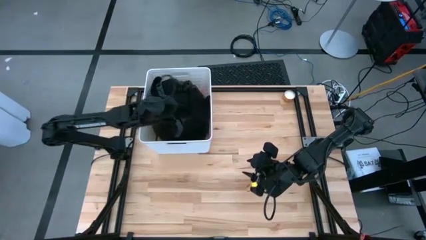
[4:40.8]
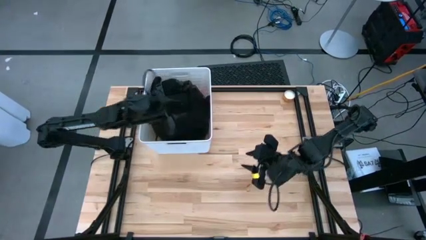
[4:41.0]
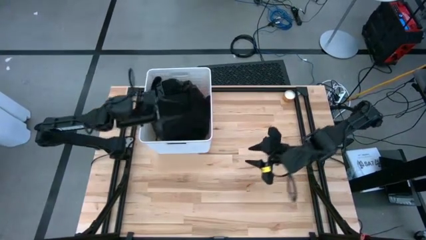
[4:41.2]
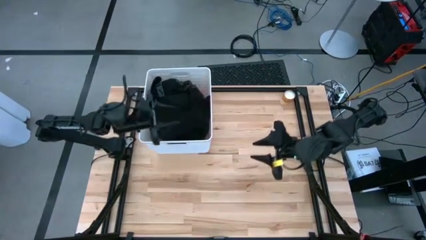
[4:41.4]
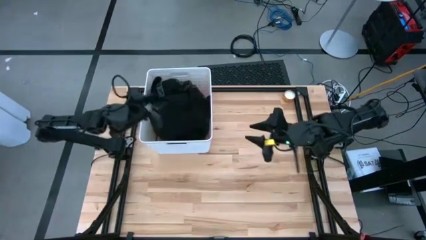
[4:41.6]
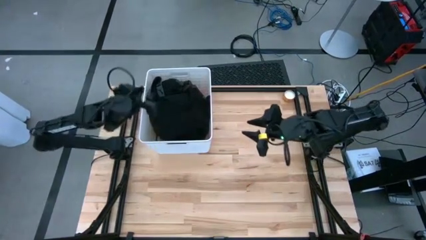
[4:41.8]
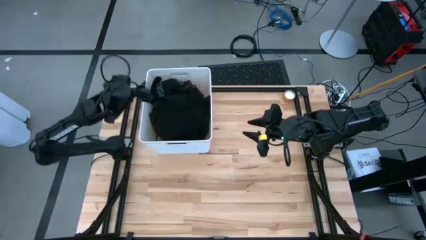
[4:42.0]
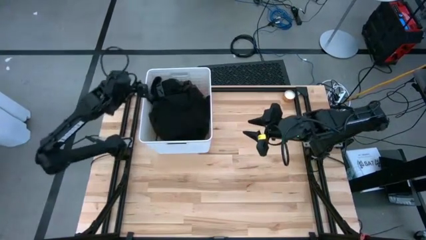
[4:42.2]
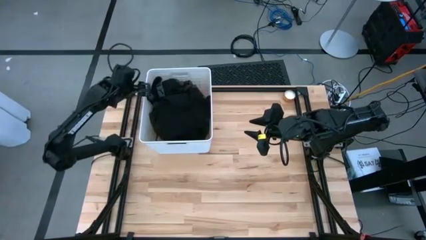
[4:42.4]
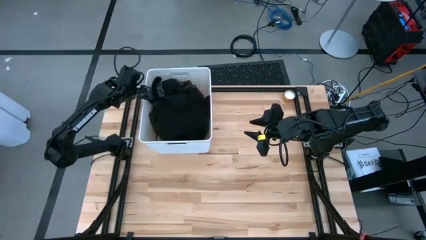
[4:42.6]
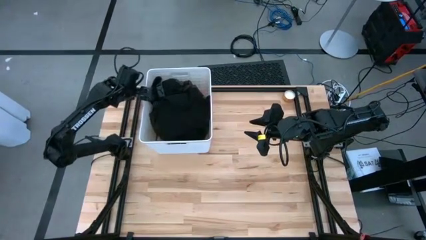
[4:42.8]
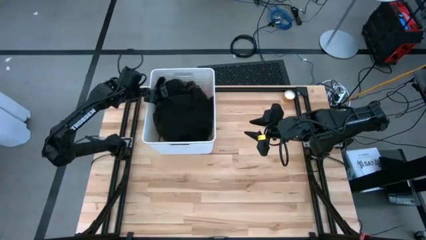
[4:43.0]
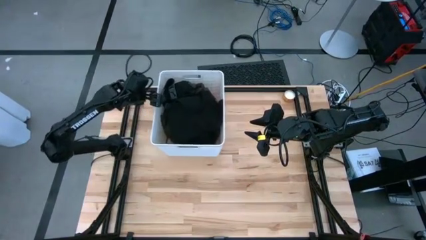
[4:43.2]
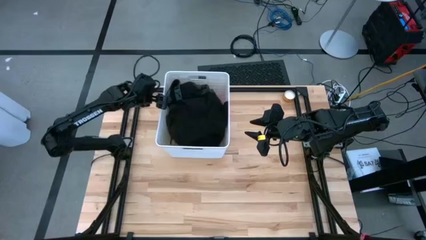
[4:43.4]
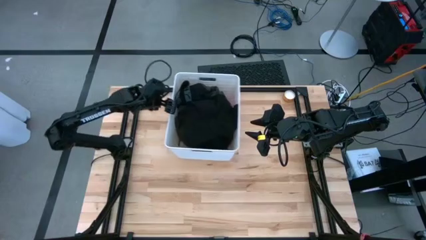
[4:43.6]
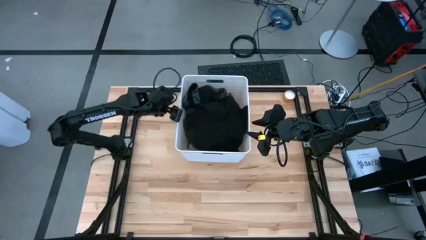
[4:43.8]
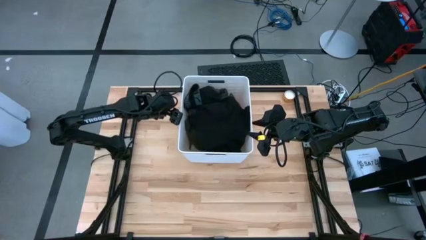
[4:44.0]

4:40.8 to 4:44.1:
Task: Sort clothes
Move the white laundry bin to the top center of the table

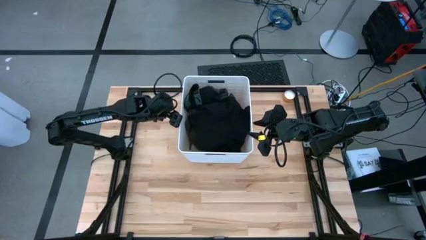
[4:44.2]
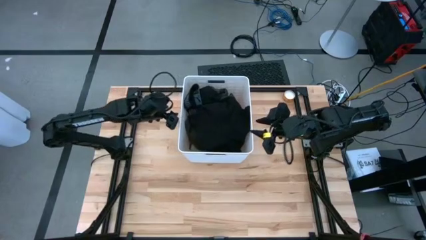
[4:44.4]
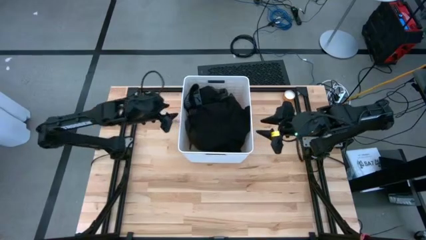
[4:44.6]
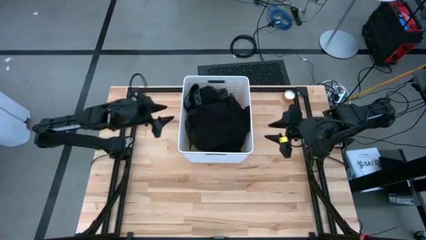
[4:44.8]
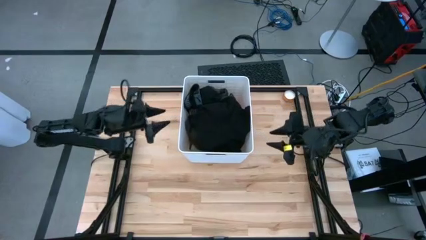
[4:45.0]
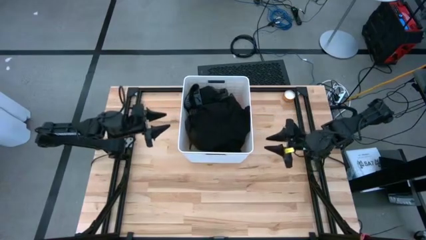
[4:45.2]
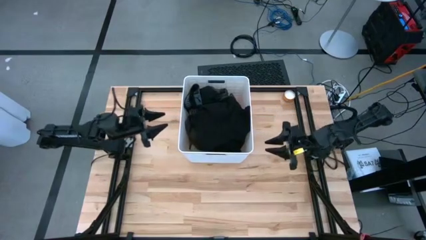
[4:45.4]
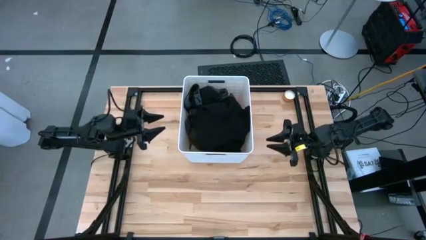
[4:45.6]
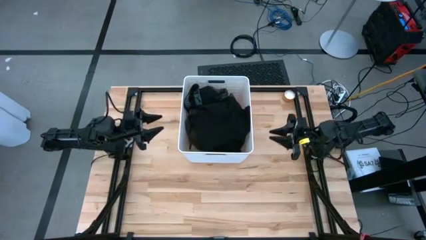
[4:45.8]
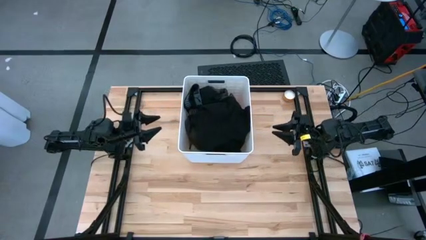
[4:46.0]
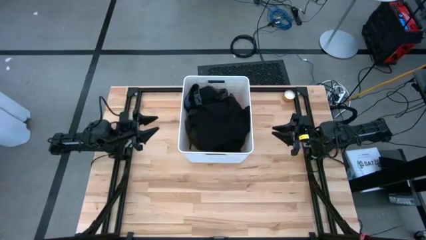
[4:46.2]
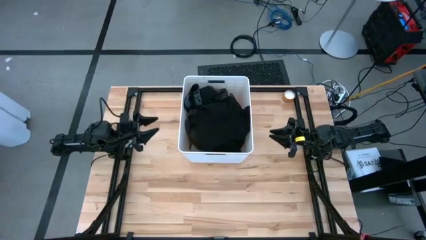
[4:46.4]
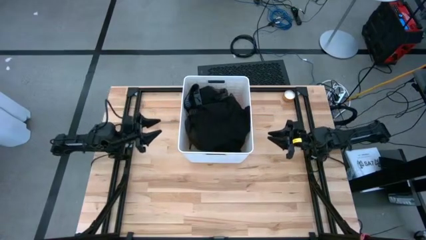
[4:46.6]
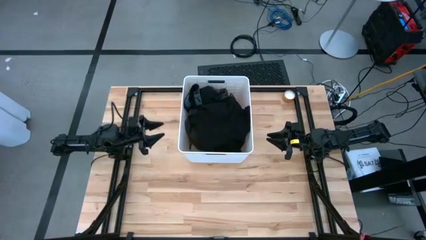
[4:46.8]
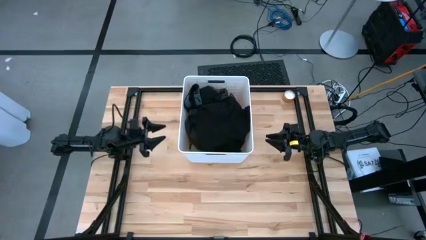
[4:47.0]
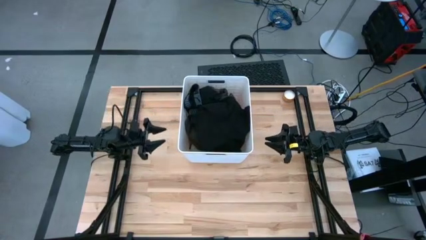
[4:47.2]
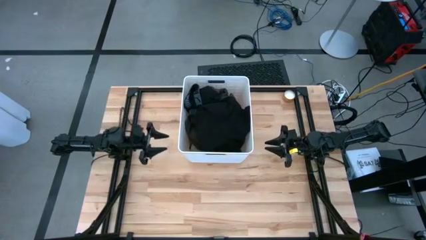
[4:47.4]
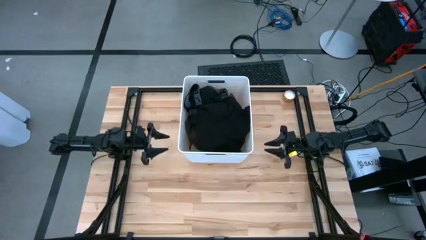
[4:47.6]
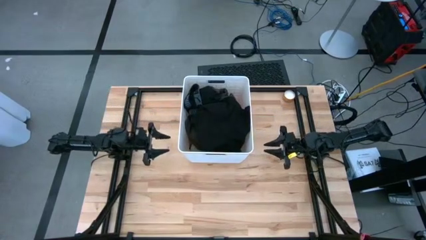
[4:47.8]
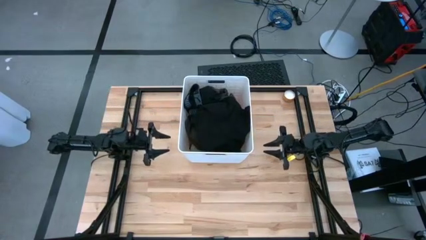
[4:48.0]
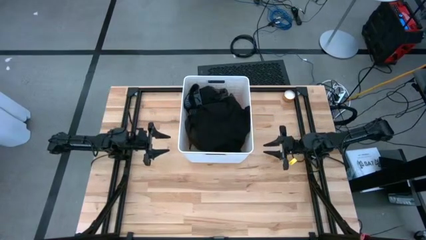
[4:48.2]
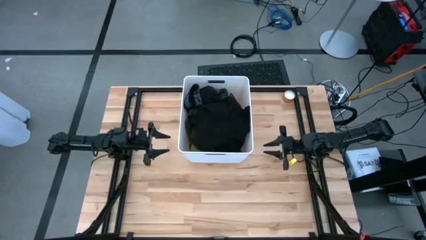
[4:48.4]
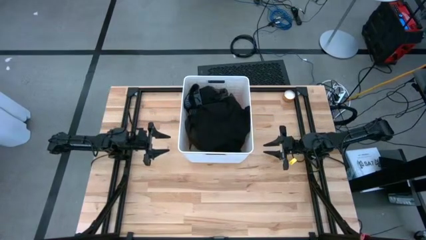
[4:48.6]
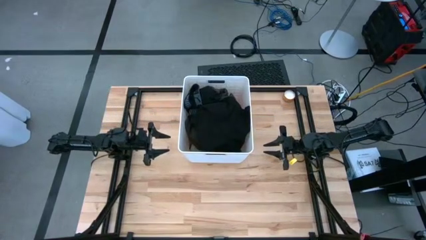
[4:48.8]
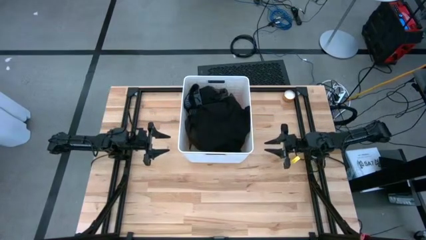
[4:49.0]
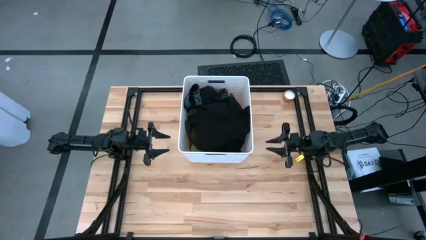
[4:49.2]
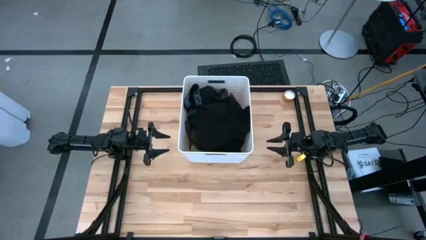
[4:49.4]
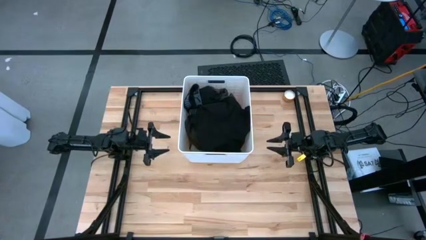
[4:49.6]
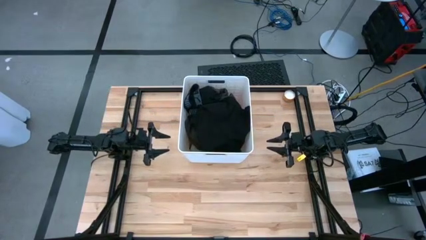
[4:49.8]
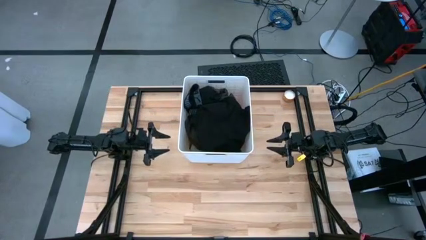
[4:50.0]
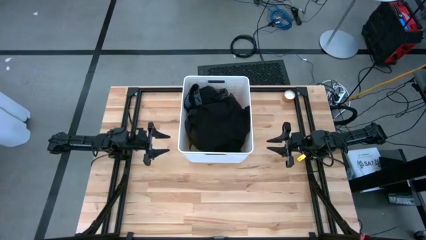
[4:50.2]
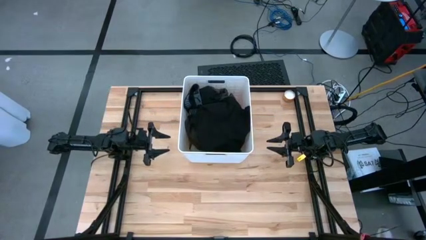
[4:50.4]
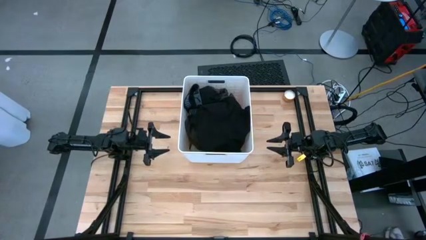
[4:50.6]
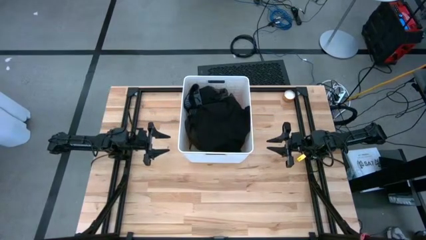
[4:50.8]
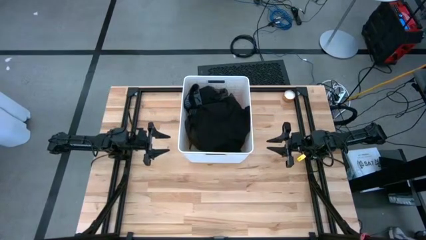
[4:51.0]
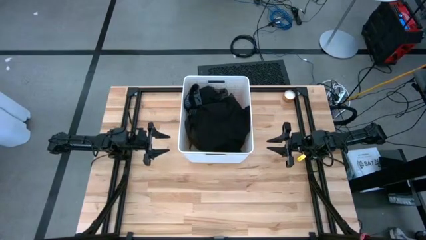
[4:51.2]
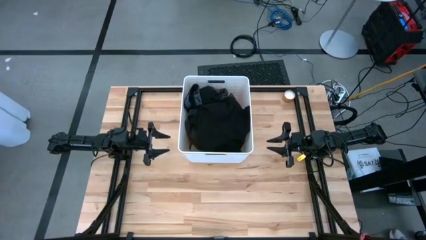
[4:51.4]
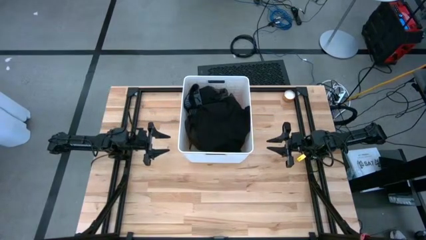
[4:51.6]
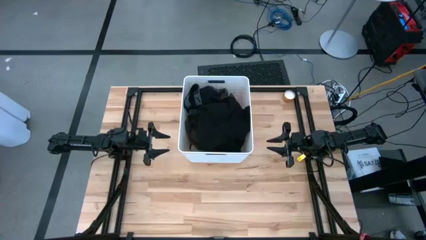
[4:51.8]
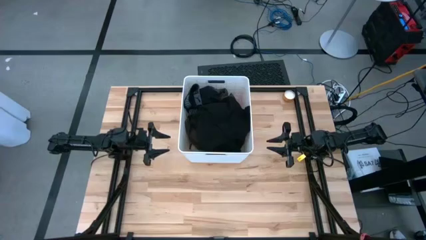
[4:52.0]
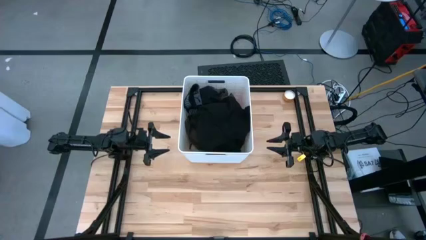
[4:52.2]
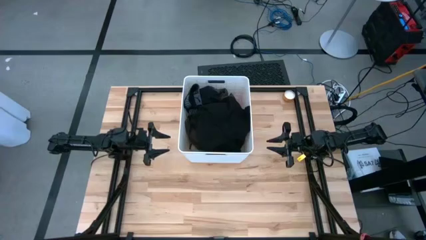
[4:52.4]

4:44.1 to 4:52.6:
Return to Home Position

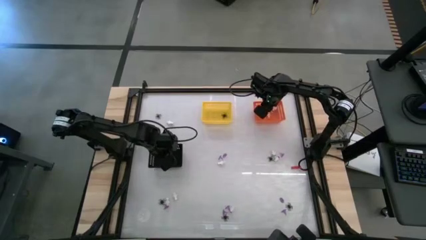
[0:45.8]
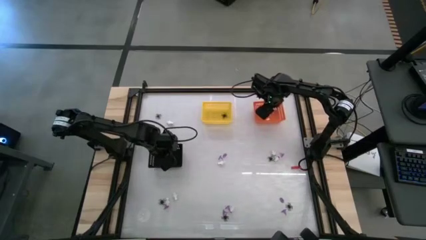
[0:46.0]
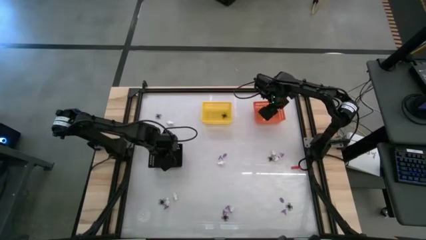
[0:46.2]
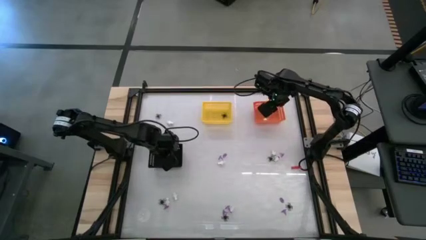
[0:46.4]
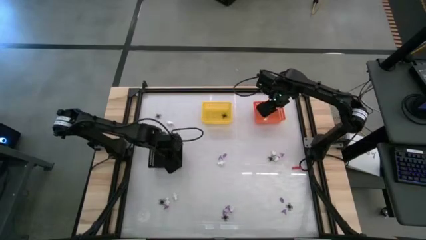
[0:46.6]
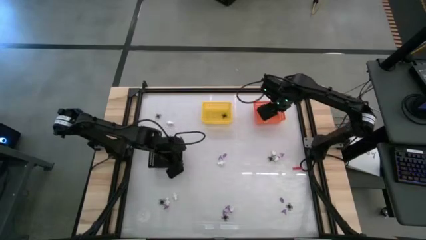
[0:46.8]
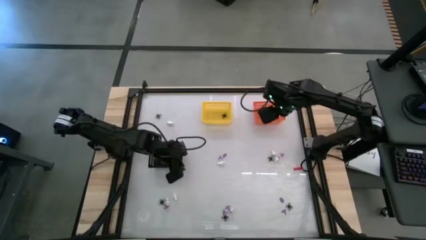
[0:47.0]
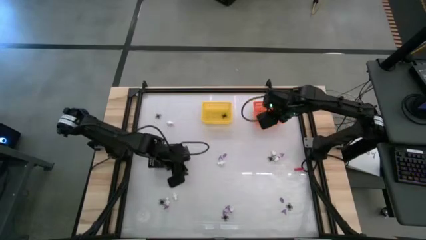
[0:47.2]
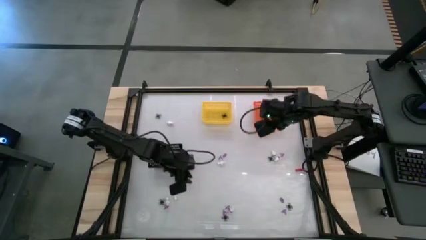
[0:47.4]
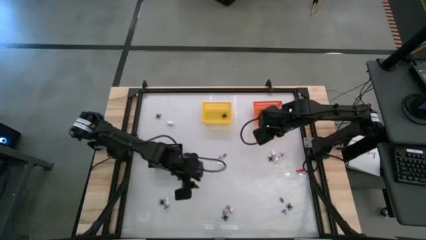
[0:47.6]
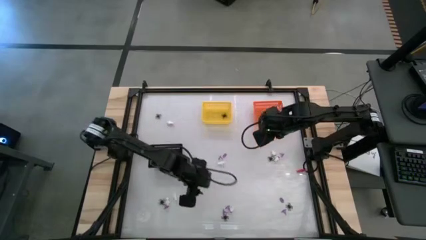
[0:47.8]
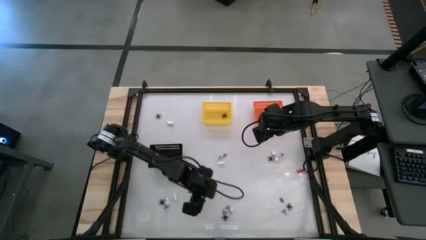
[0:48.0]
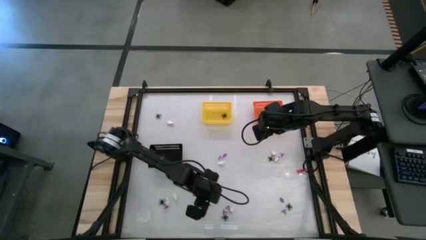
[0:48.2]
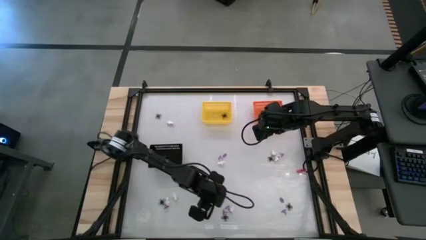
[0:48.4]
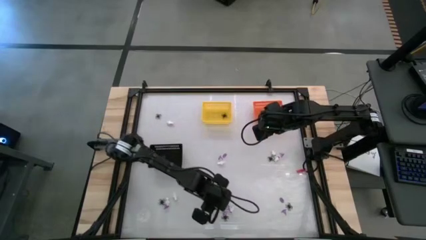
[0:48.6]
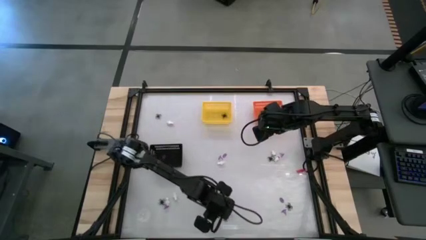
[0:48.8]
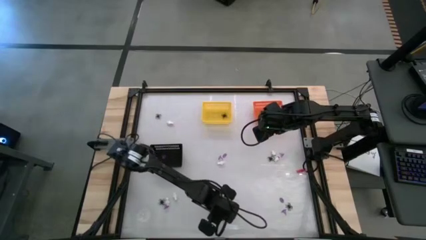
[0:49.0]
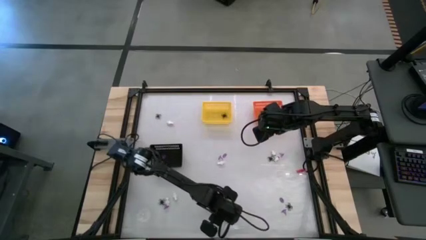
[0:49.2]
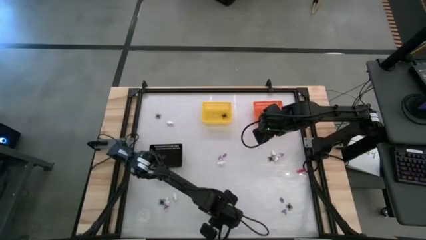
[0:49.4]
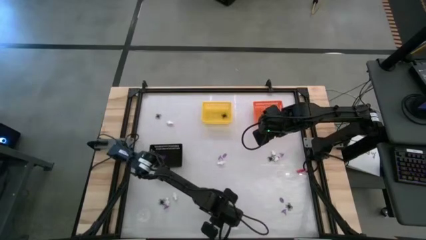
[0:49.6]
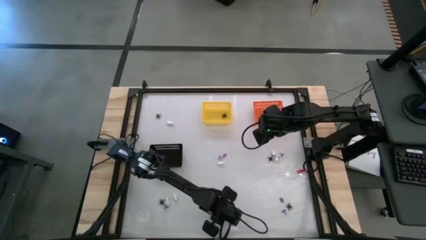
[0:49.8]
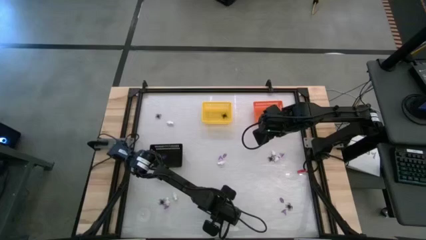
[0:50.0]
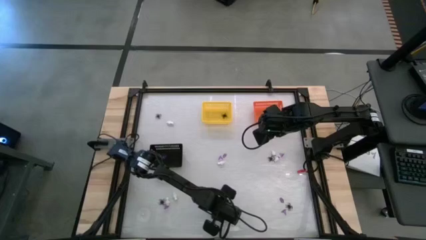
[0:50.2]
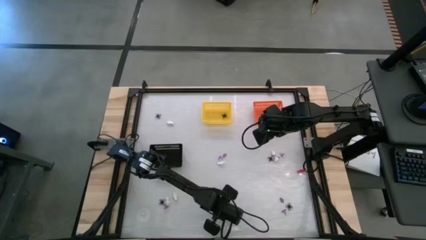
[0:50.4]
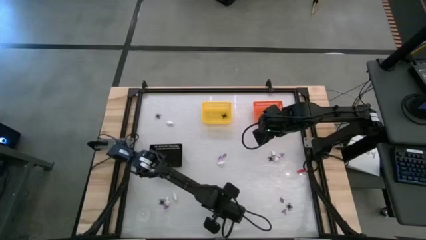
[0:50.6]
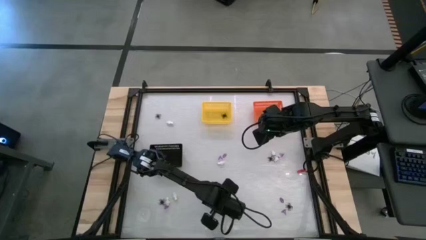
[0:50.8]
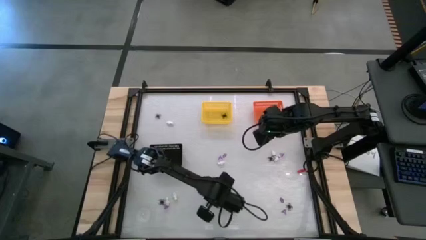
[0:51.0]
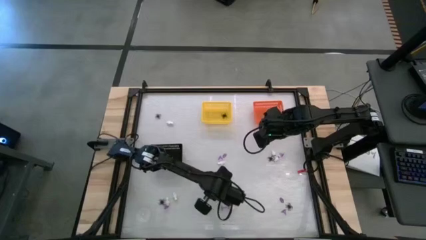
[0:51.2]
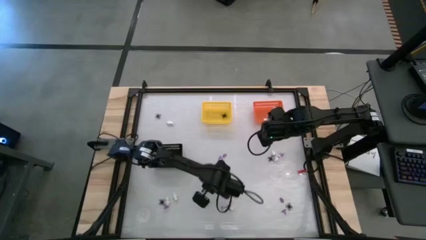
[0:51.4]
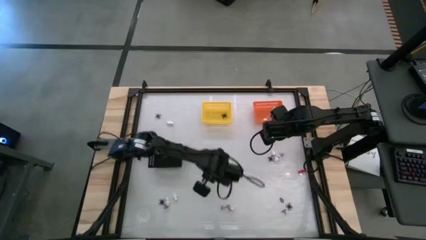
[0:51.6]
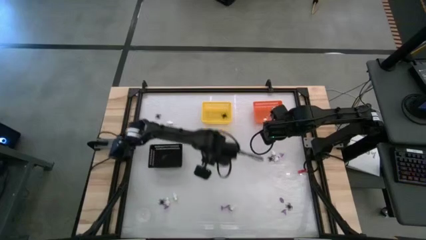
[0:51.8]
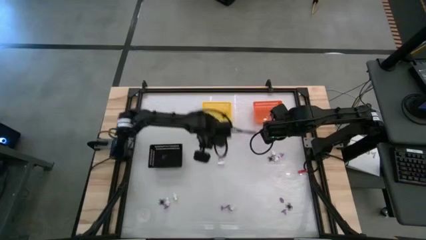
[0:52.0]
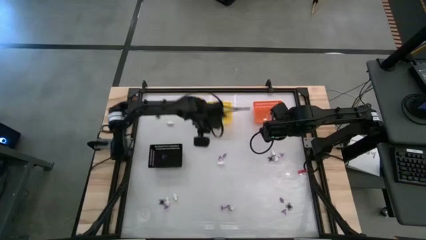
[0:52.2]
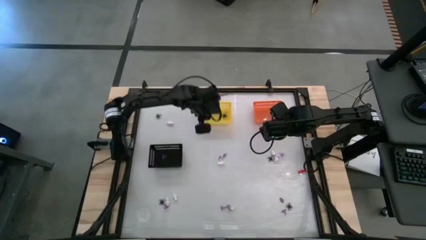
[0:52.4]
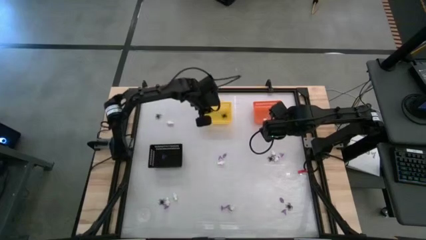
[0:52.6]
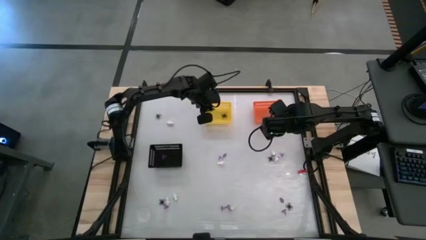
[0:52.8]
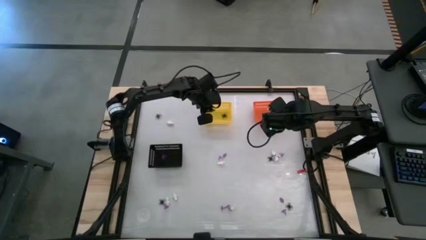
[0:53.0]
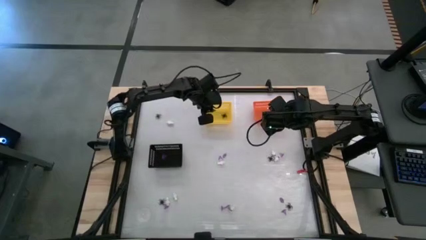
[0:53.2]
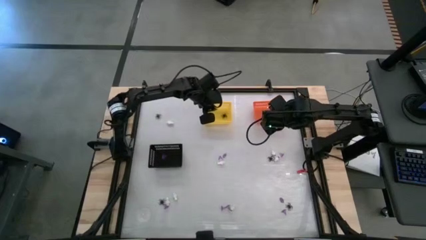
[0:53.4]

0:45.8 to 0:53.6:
Task: Sort Halloween decoration
Put the black spider toy into the yellow basket
